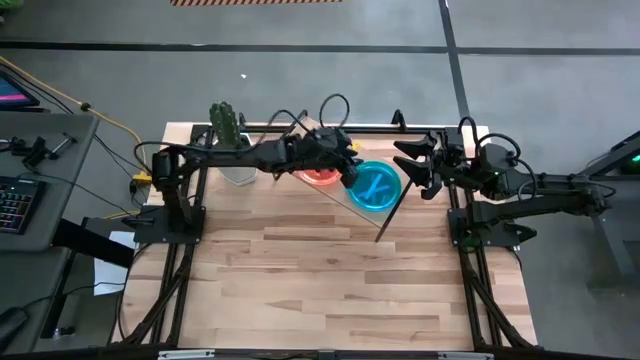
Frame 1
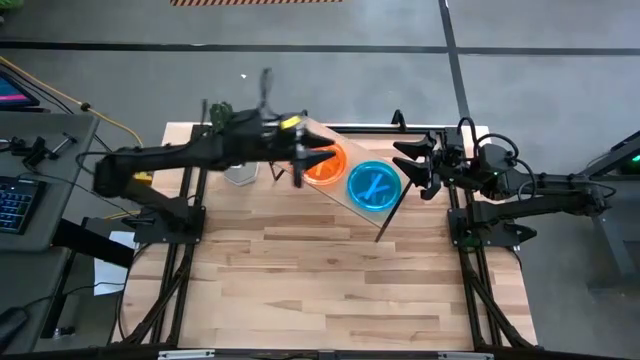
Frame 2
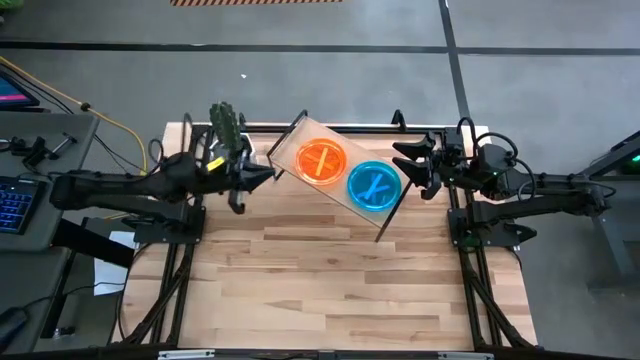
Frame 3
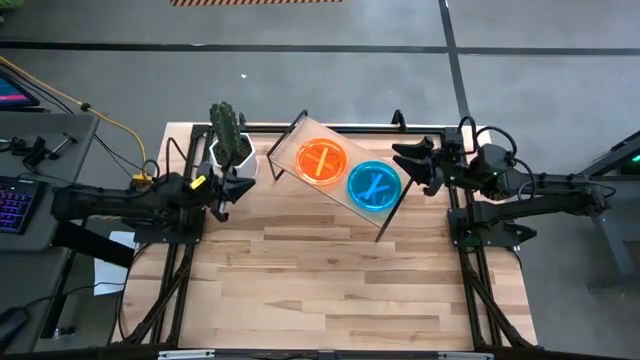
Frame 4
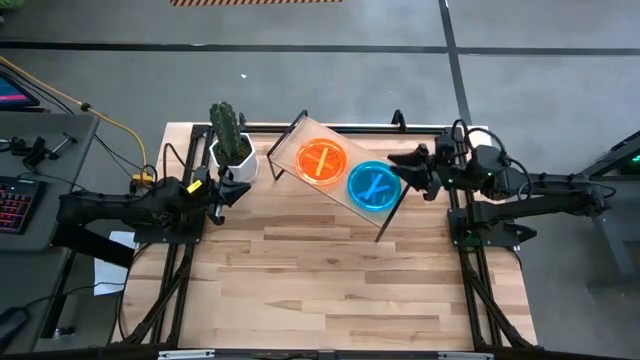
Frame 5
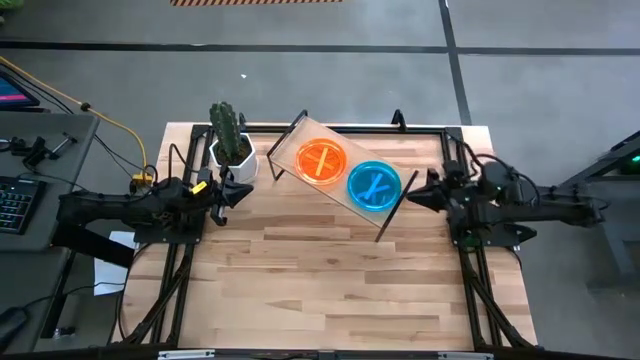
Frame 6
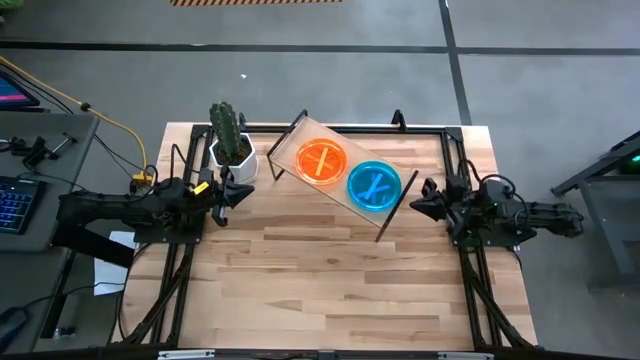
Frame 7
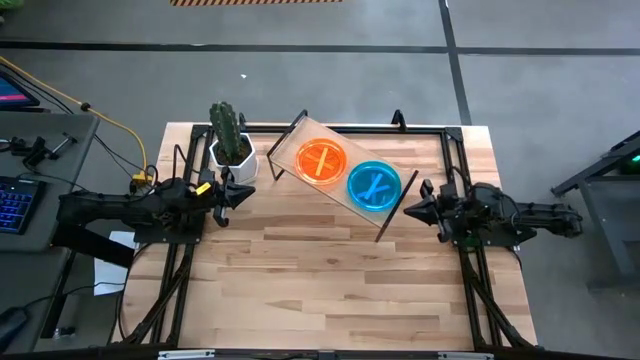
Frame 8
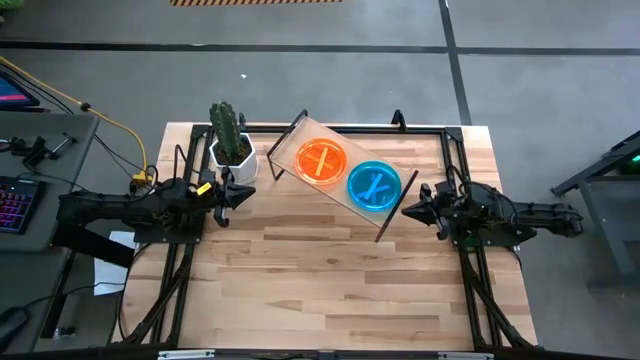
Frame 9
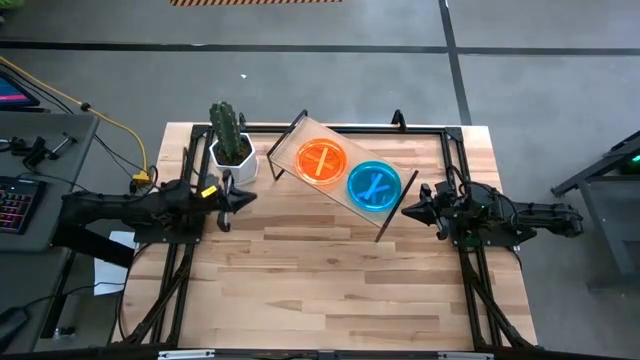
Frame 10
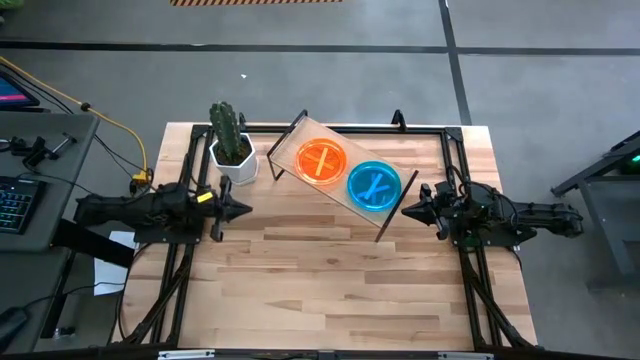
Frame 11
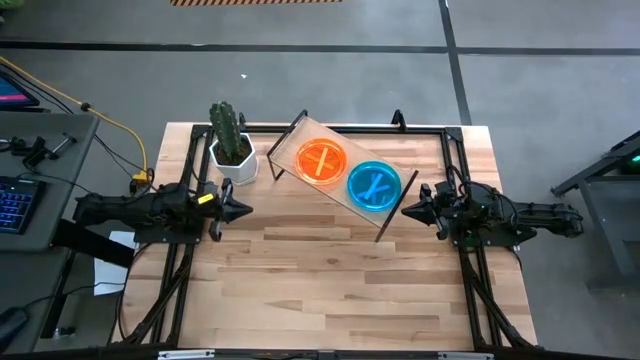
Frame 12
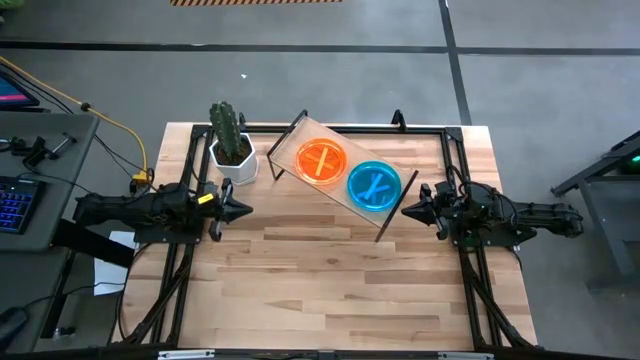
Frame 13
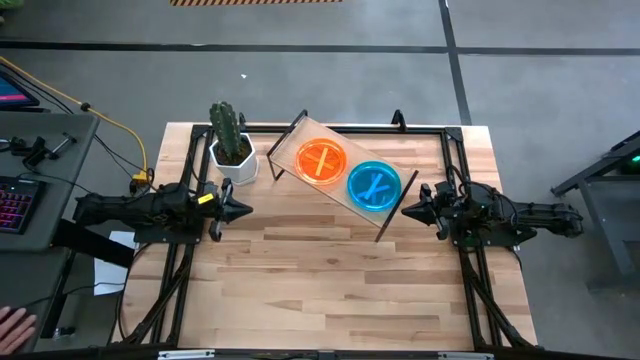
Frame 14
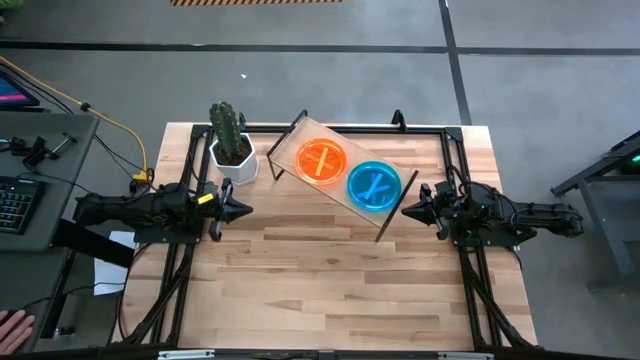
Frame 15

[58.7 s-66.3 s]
Task: Place and stack plates onto a shelf
Return to Home Position

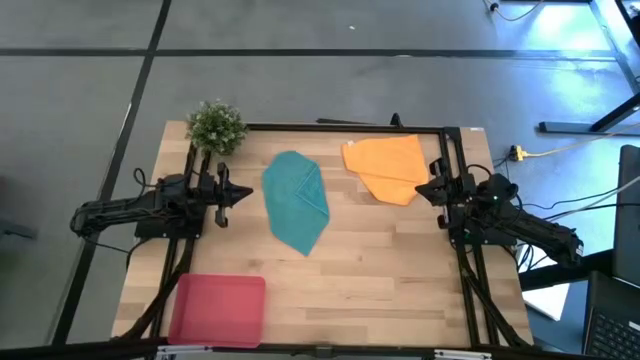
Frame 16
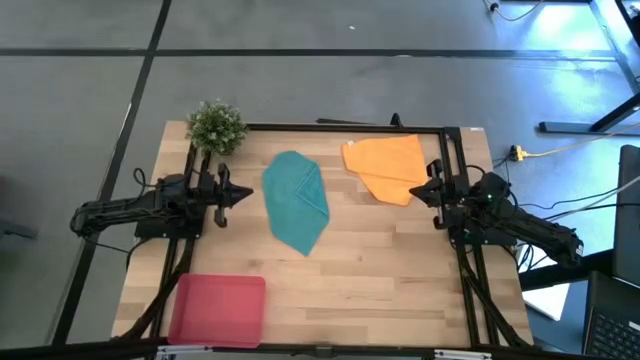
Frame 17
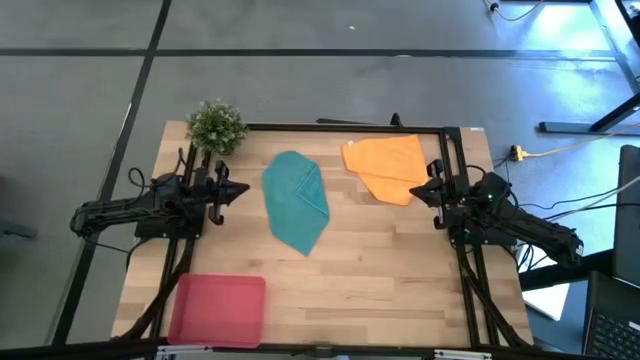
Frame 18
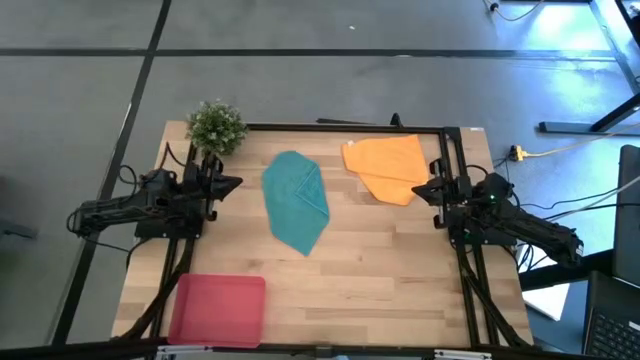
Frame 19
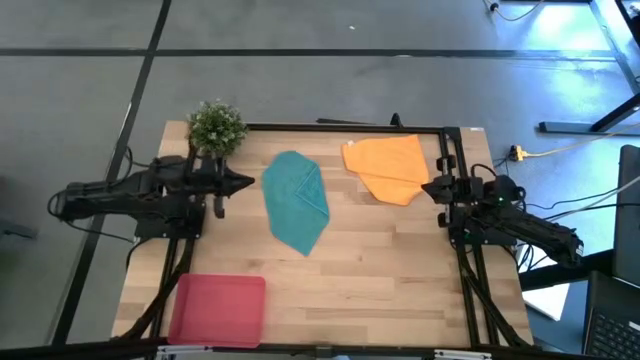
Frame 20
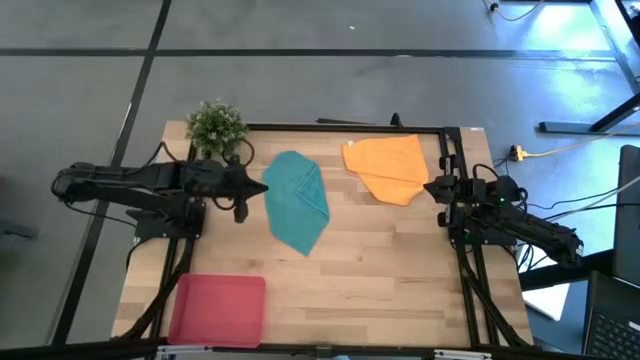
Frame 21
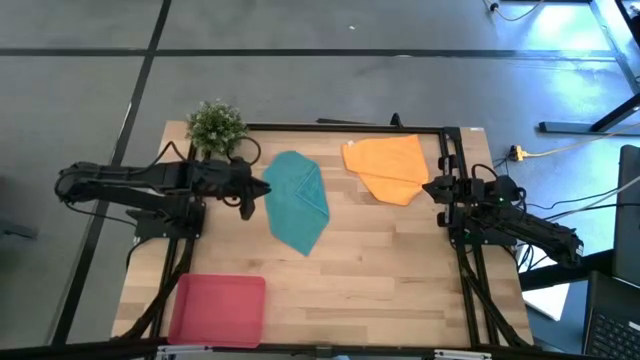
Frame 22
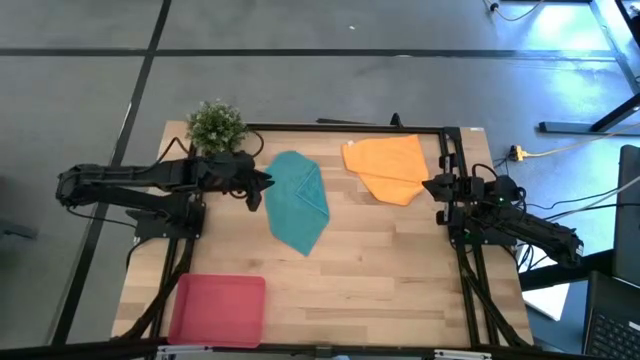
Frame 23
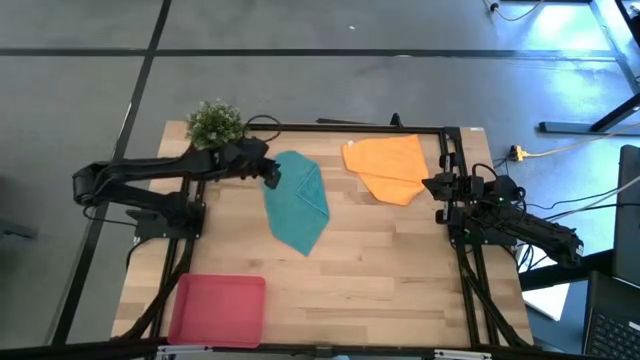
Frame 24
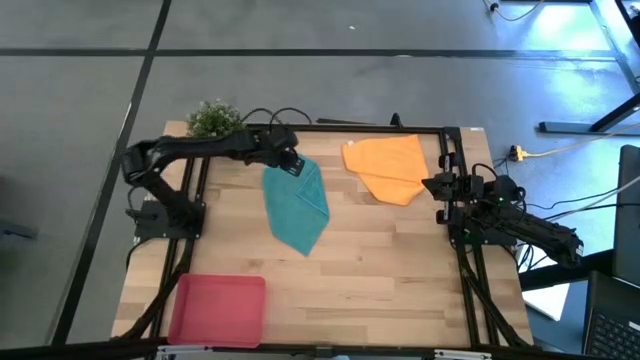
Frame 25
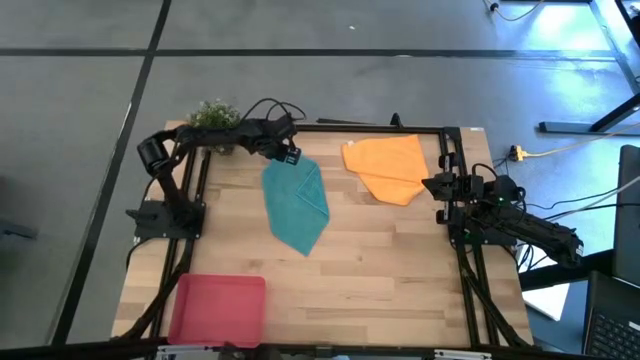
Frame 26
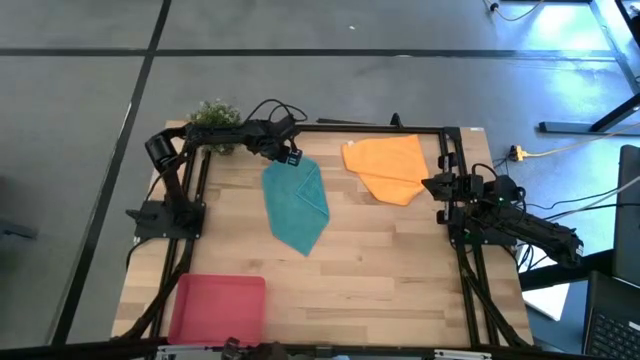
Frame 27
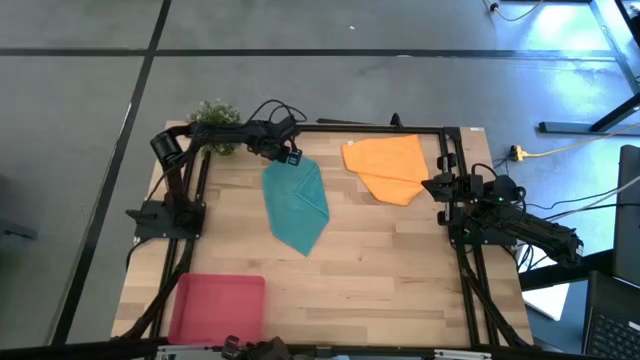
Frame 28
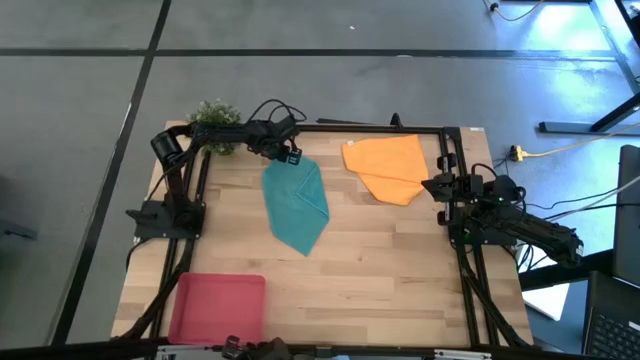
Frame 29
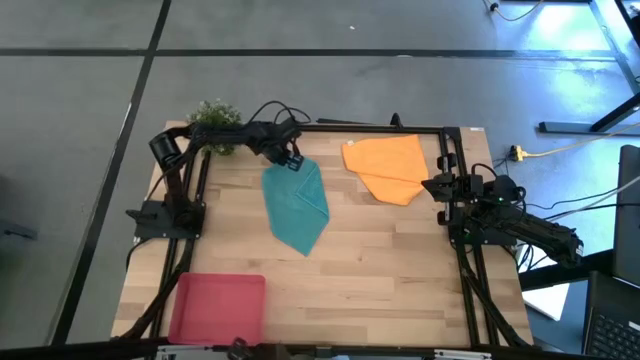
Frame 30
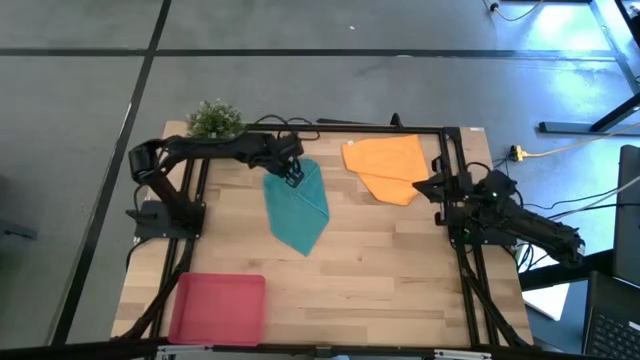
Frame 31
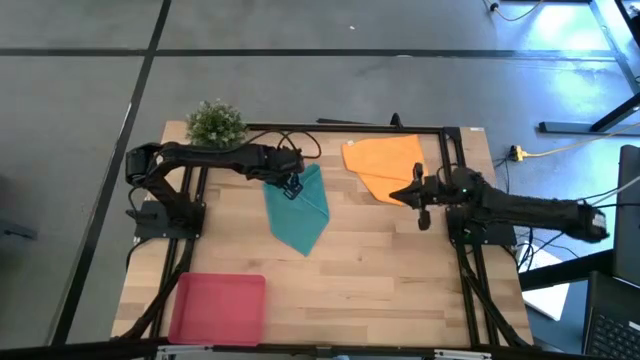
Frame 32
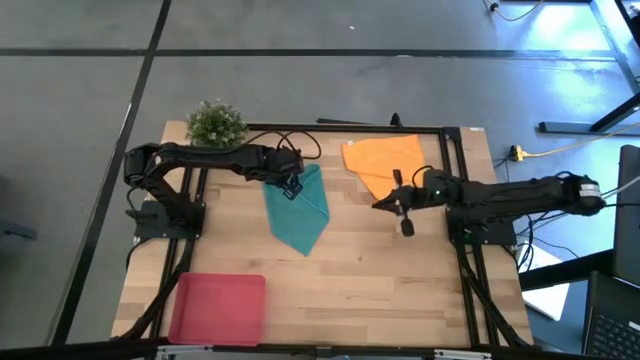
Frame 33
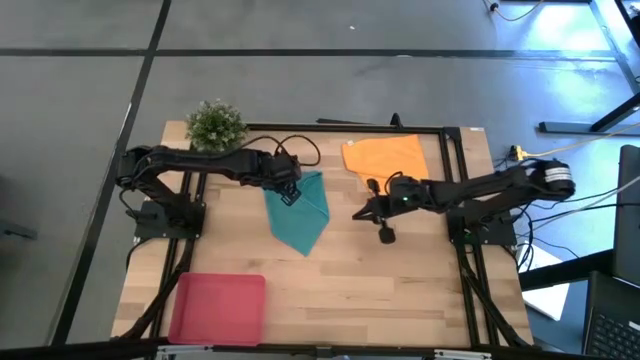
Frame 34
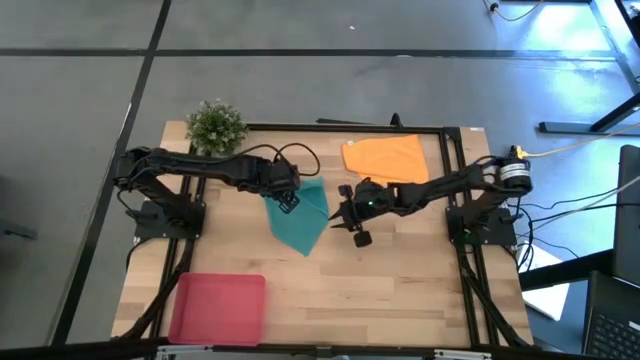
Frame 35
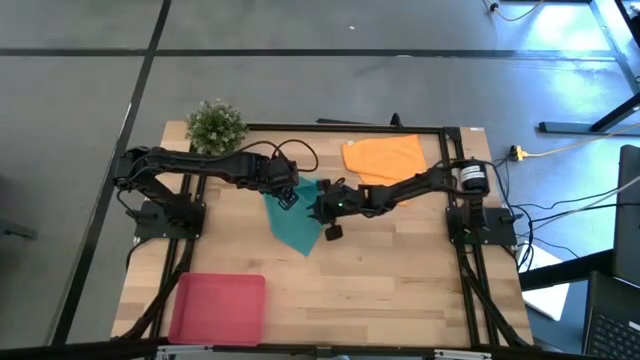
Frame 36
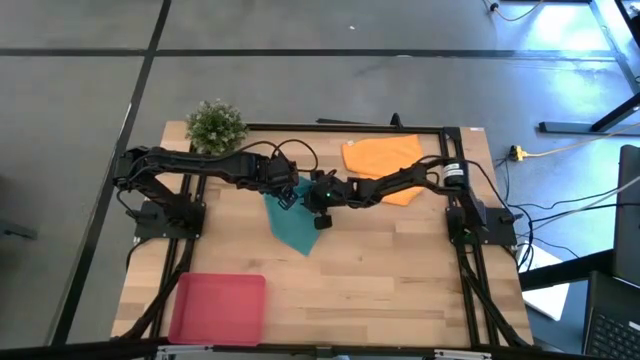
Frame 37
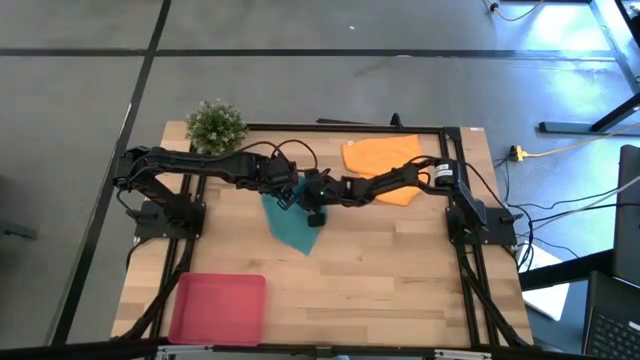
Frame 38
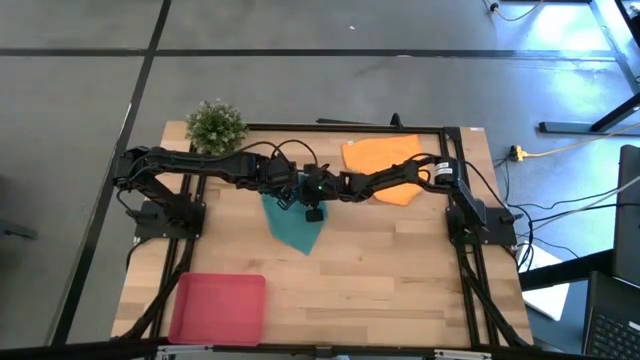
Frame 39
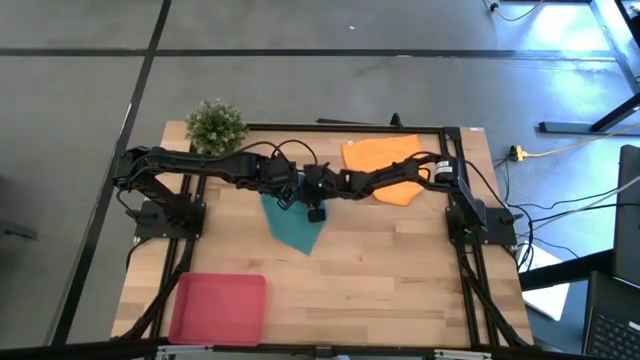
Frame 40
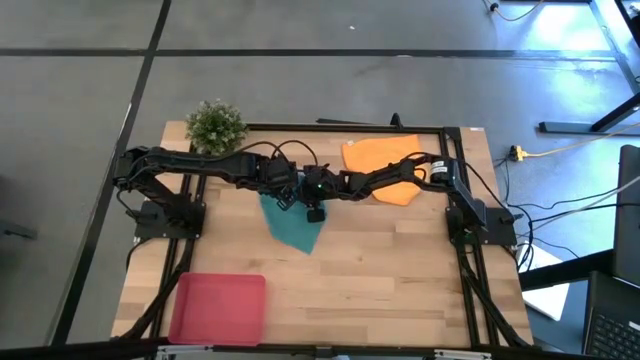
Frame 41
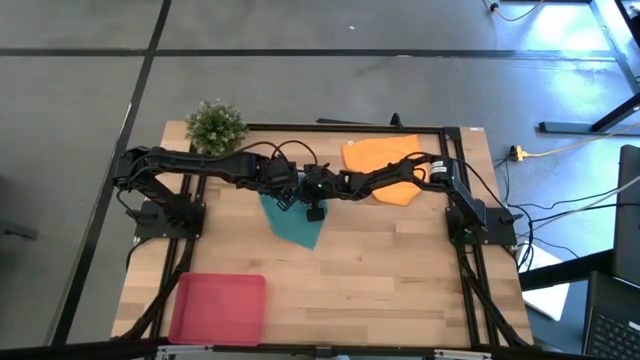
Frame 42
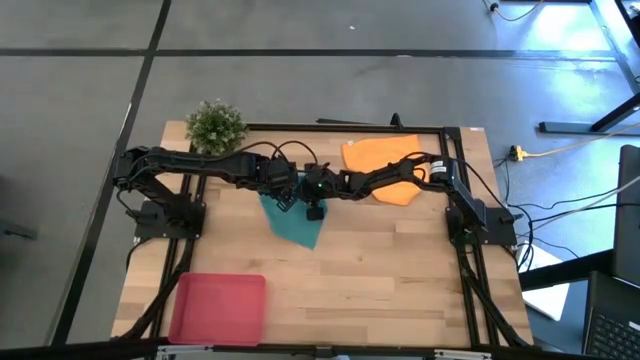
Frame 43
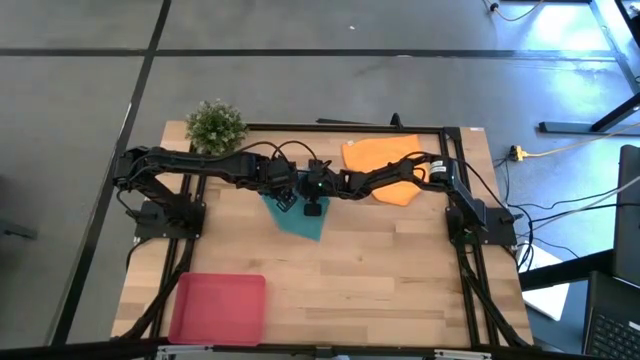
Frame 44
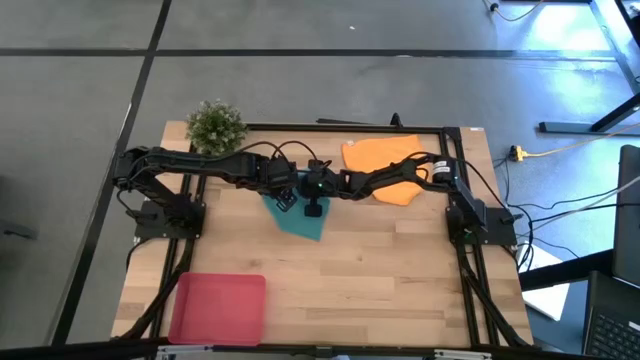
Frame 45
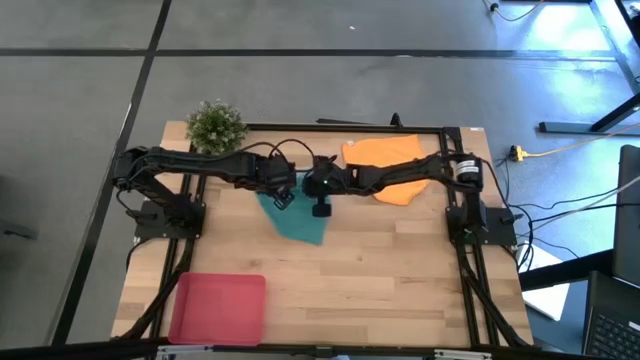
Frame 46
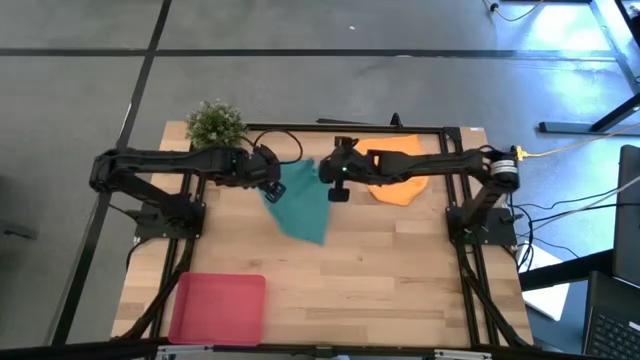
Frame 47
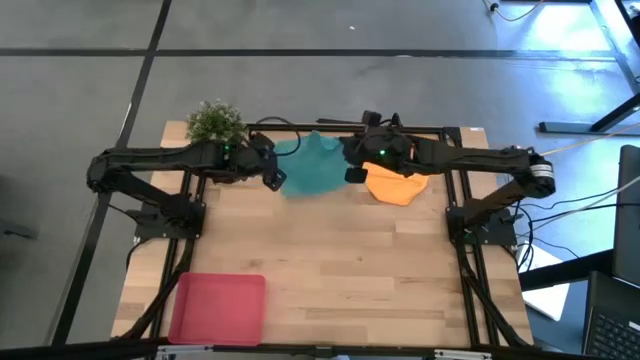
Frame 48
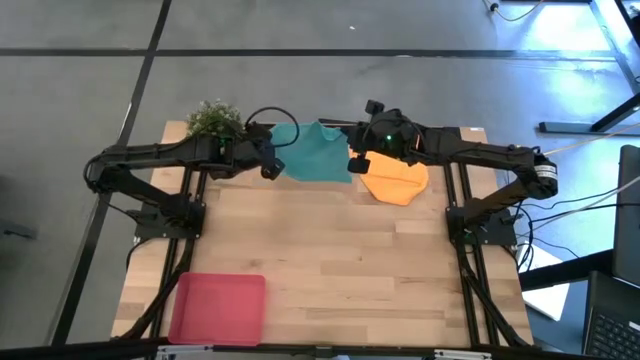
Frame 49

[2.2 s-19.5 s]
Task: Roll microfiber towels into tight, uniform cylinder then place into a basket
Fold the blue microfiber towel
